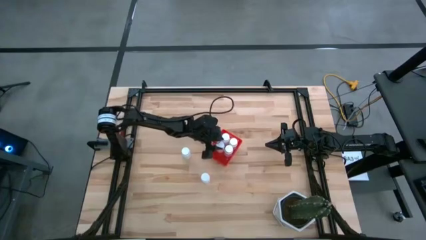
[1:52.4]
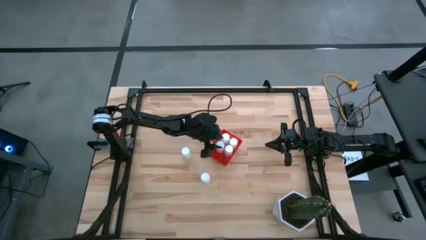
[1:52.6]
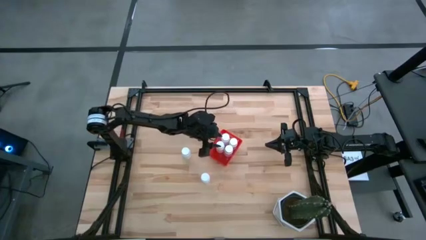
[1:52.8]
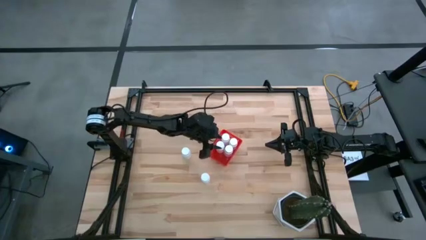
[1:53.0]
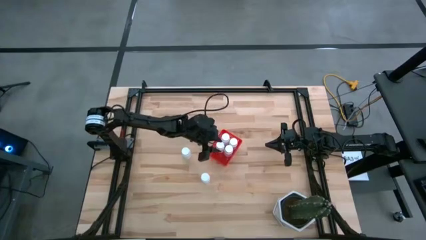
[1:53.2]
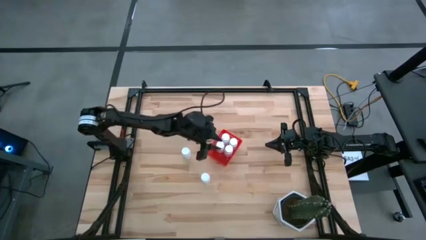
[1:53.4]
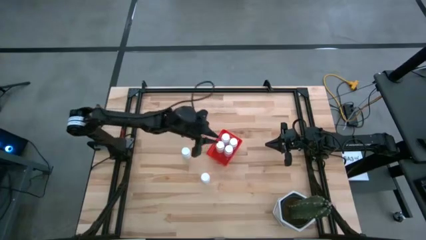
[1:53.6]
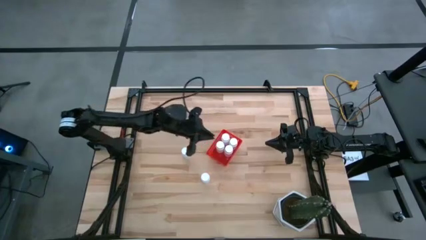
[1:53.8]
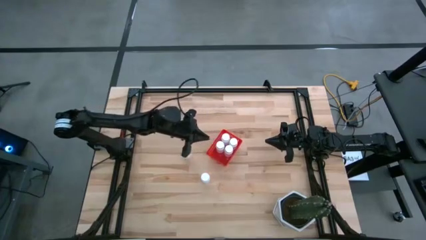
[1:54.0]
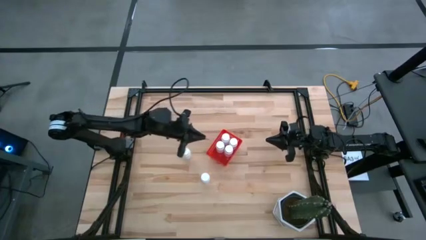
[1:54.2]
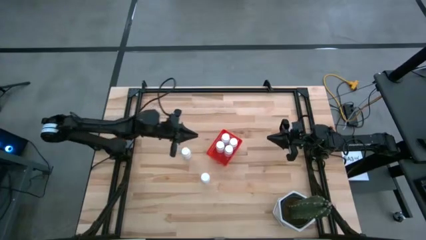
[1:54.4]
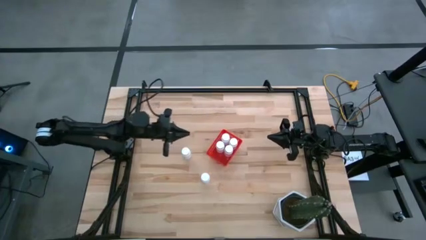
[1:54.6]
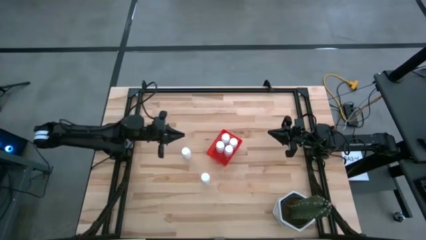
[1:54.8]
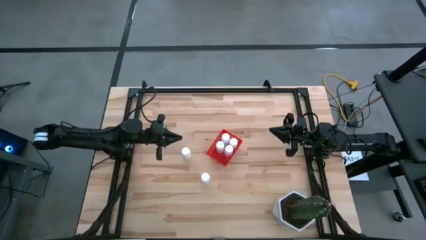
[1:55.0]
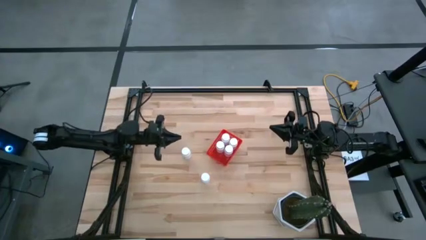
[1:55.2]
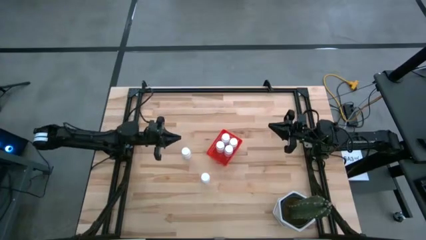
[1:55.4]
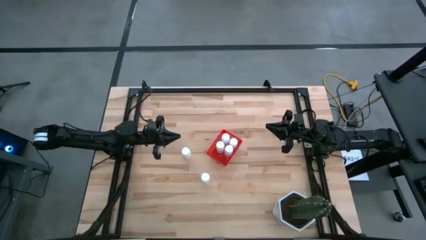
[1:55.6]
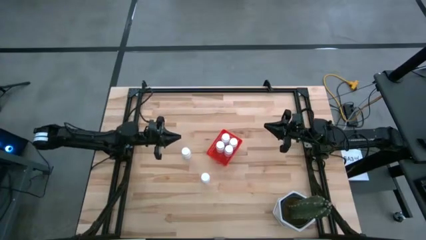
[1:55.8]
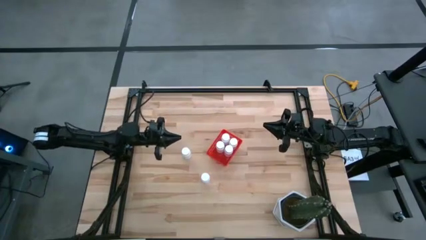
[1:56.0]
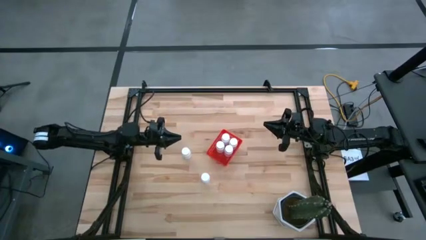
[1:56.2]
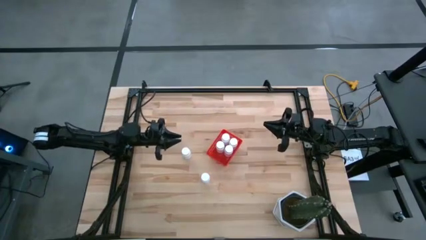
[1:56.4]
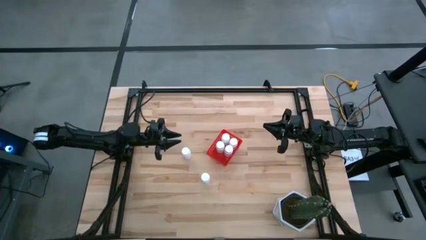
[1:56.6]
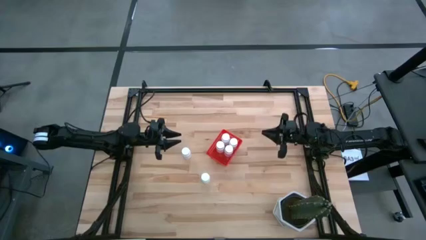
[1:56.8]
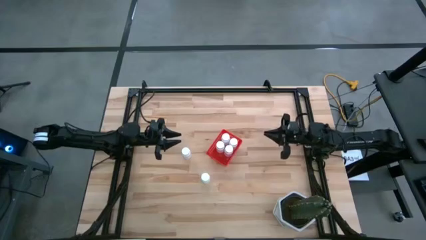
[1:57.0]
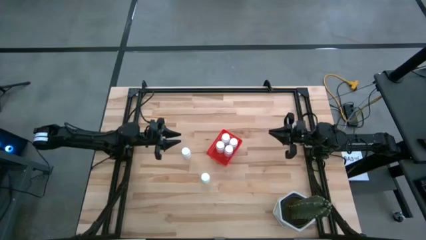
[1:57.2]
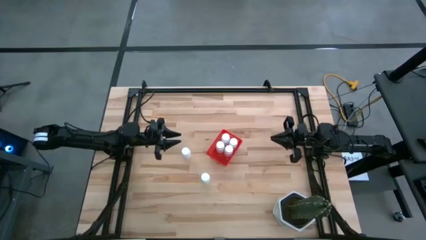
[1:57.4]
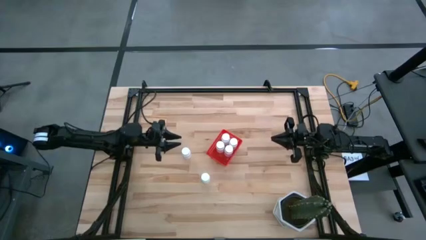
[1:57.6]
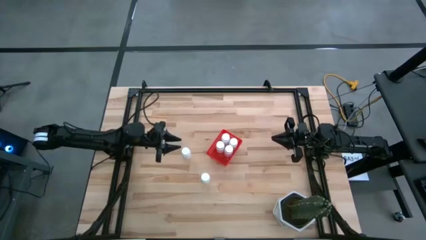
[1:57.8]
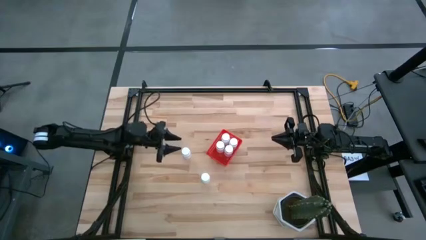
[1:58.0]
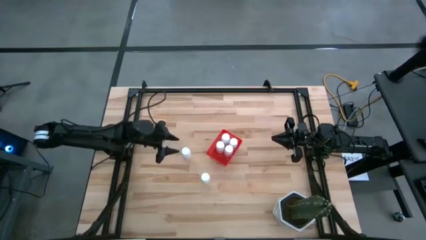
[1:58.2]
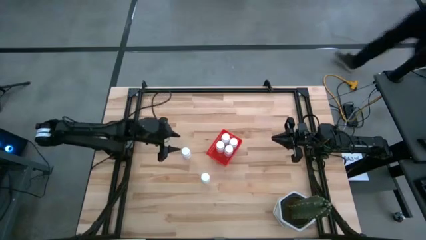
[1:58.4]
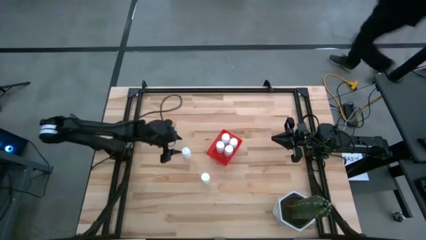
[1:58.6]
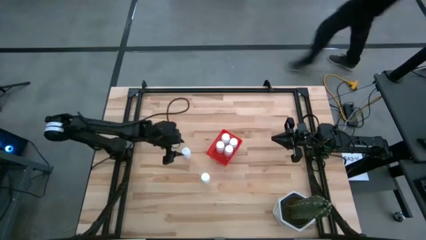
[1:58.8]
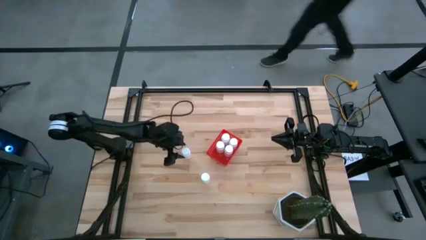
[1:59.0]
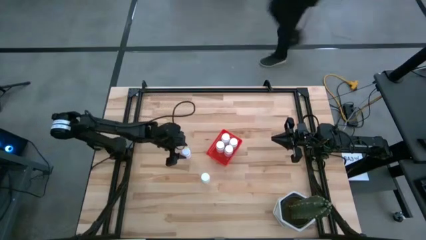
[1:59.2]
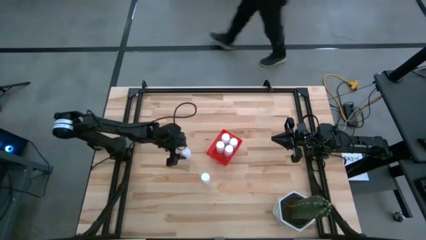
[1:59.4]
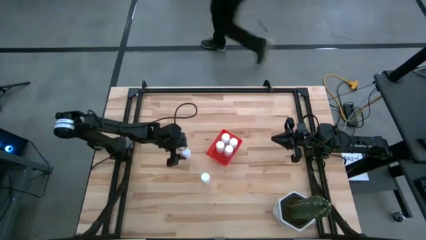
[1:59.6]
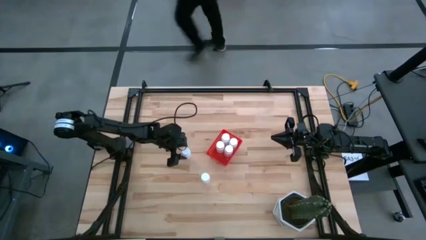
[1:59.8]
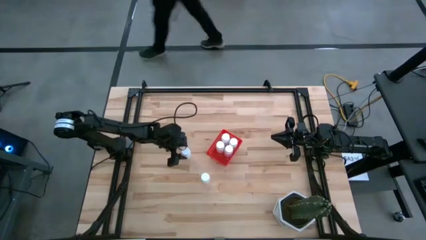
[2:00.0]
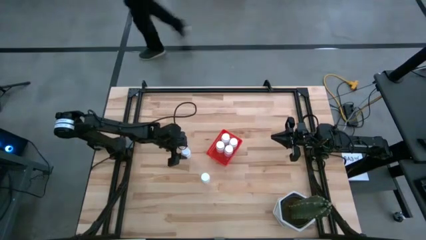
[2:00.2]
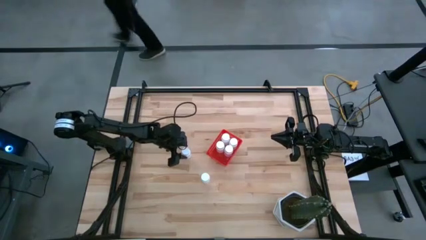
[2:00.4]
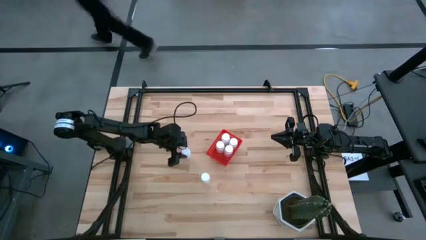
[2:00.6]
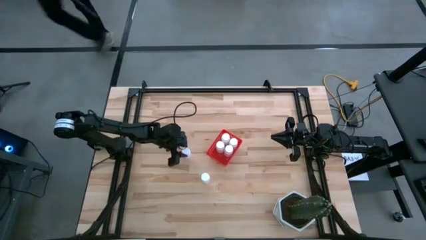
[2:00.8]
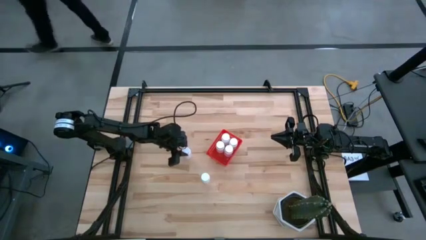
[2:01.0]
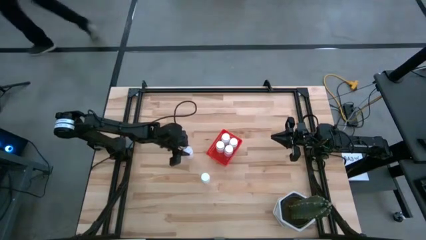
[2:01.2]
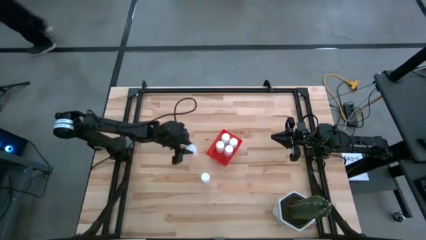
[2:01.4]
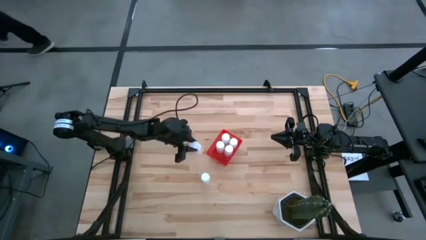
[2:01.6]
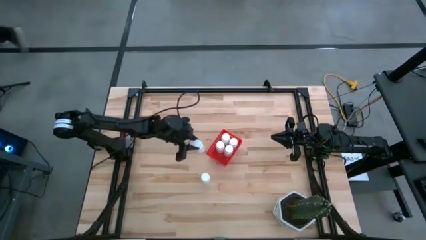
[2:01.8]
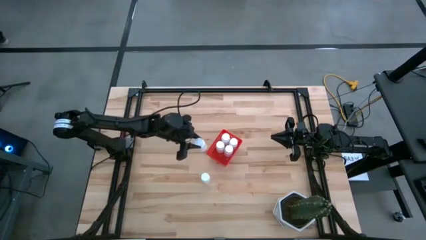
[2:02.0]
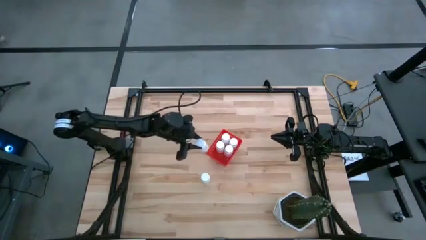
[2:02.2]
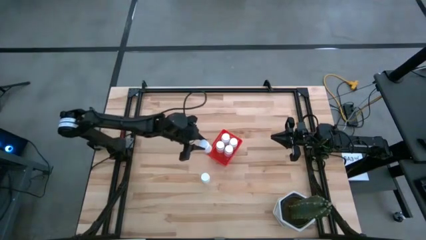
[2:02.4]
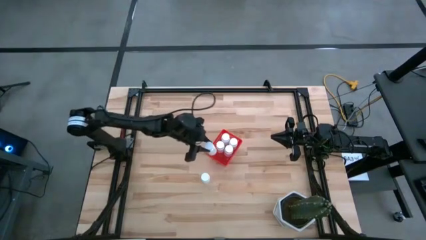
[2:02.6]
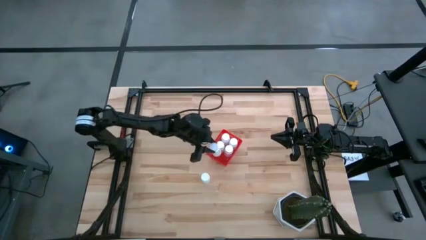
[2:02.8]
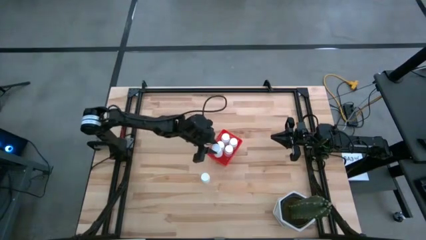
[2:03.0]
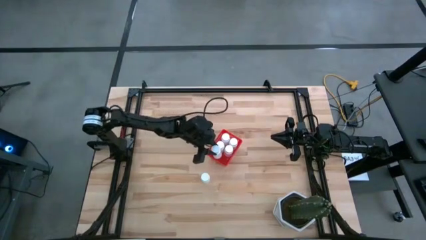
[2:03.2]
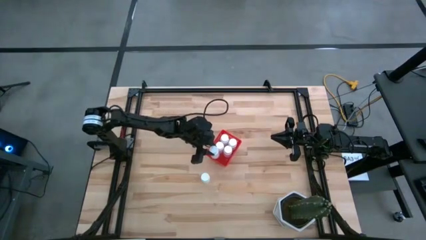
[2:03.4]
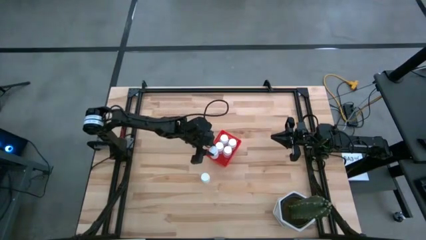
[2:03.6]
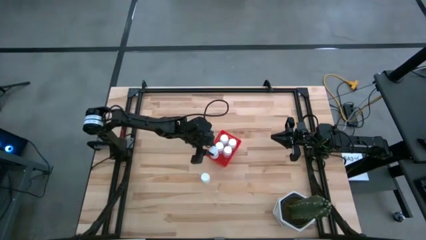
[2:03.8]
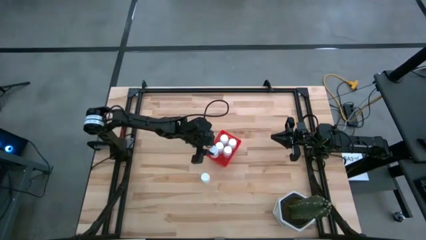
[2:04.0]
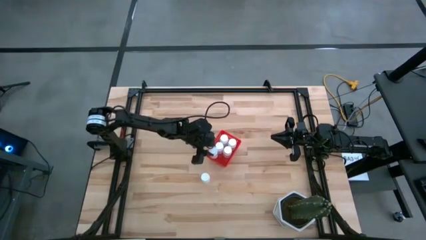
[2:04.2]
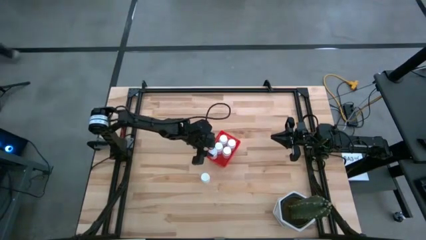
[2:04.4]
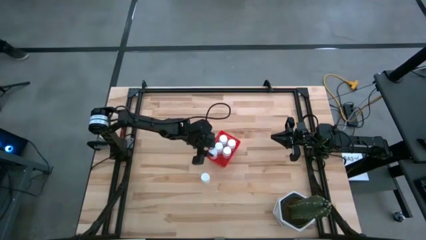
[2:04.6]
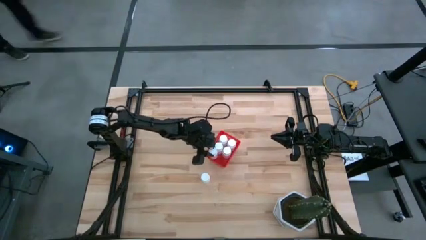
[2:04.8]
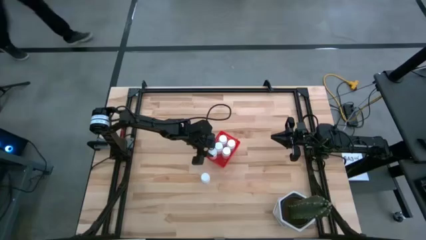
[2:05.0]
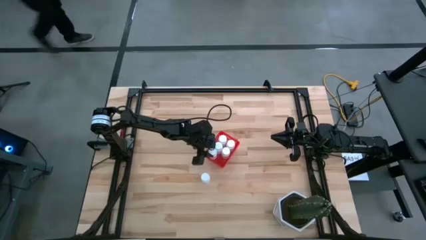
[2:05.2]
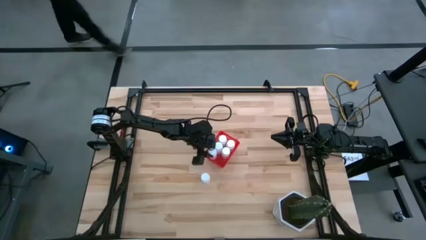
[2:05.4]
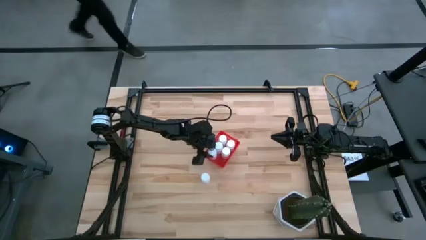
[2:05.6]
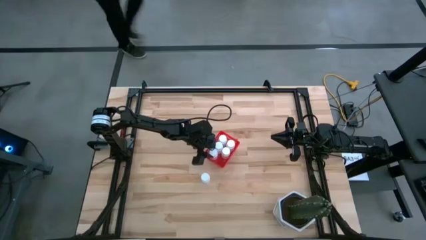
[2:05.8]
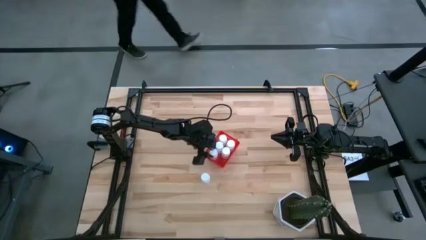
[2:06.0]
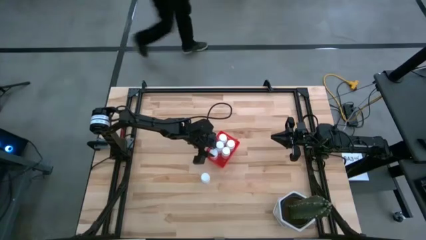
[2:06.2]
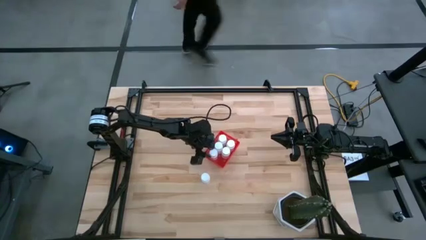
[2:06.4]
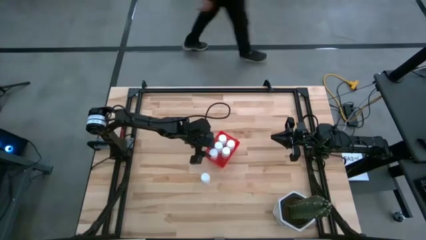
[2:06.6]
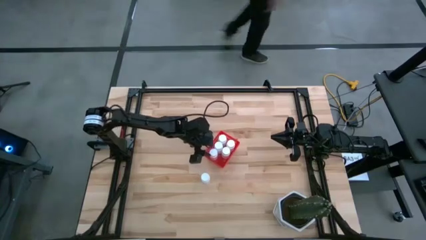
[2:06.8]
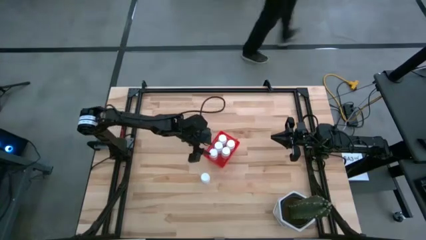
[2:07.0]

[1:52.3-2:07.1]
Task: Pick and place pill bottles into a basket
Put the top white pill bottle into the red basket
